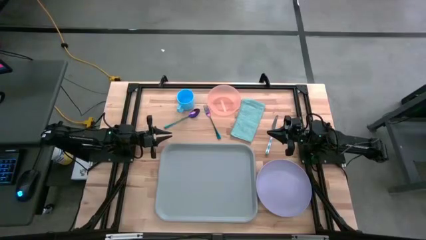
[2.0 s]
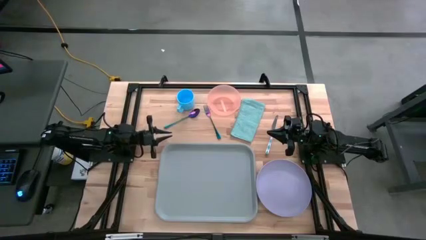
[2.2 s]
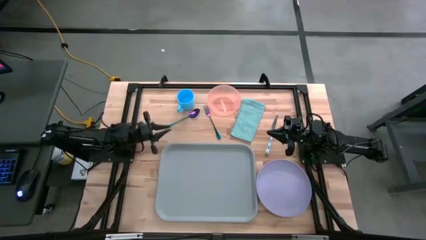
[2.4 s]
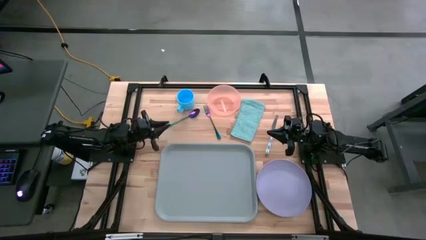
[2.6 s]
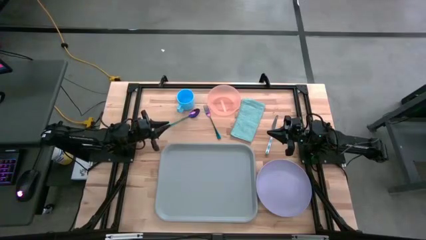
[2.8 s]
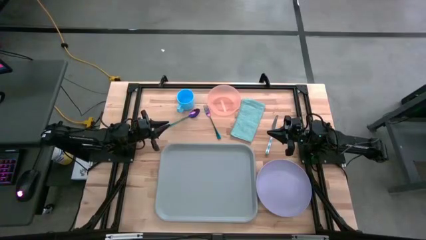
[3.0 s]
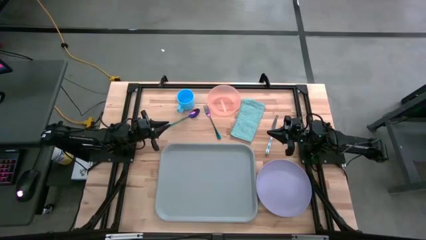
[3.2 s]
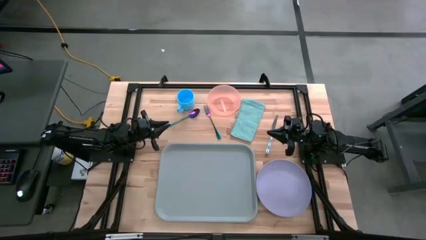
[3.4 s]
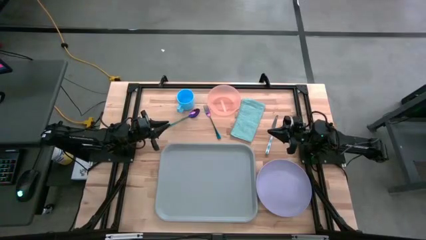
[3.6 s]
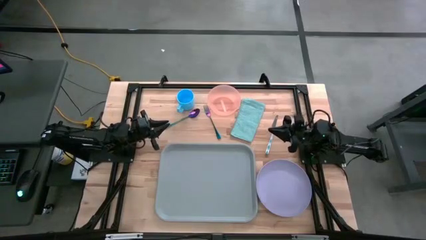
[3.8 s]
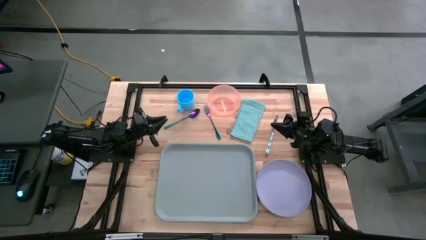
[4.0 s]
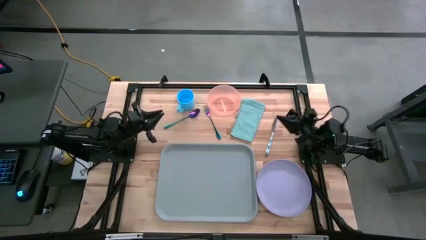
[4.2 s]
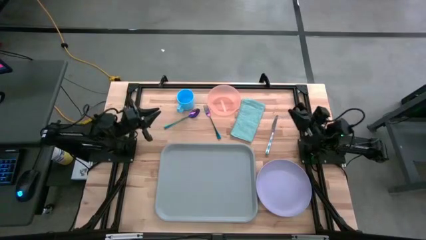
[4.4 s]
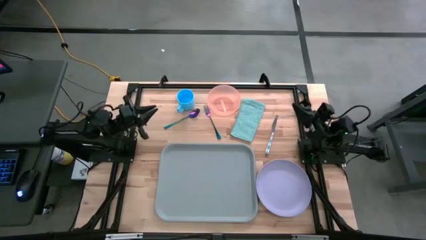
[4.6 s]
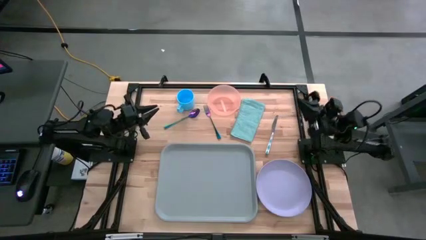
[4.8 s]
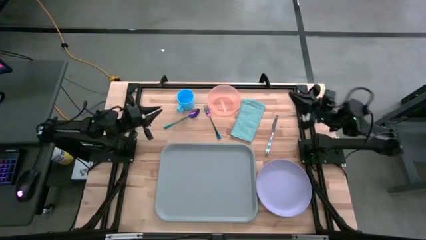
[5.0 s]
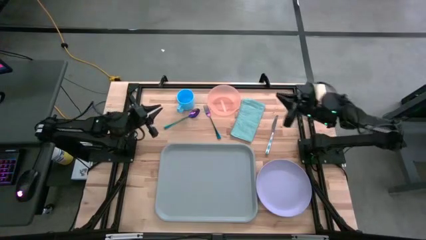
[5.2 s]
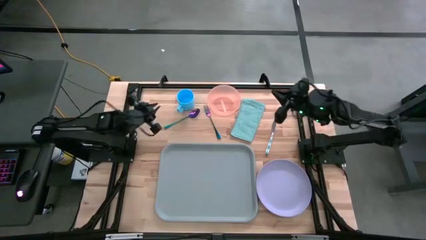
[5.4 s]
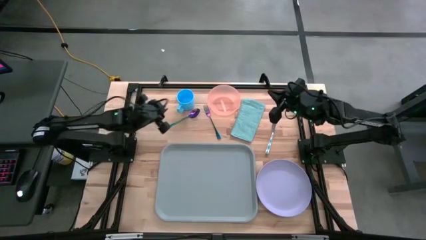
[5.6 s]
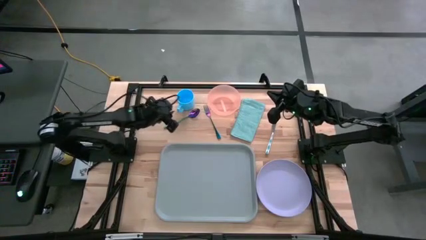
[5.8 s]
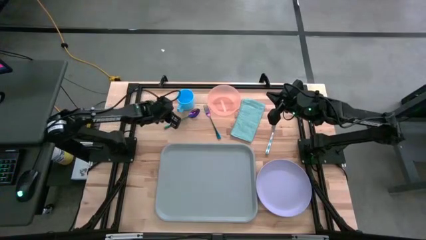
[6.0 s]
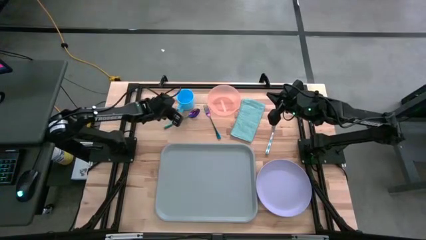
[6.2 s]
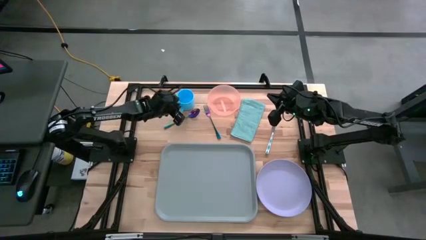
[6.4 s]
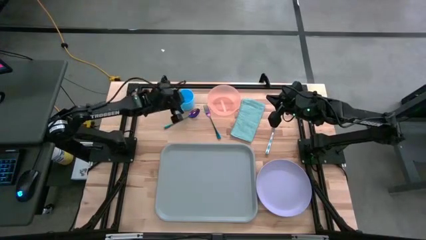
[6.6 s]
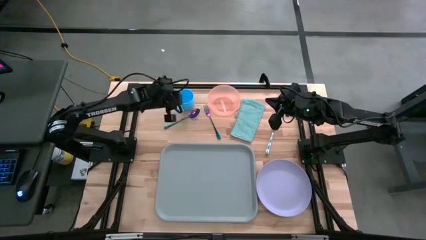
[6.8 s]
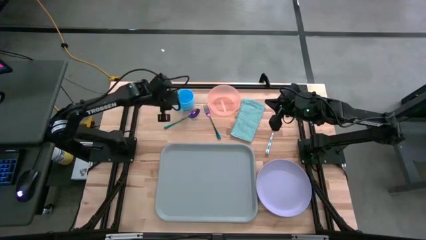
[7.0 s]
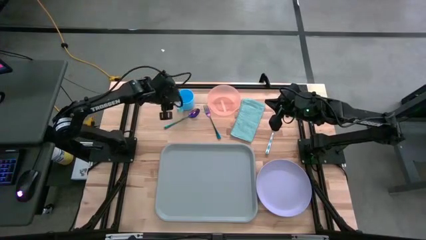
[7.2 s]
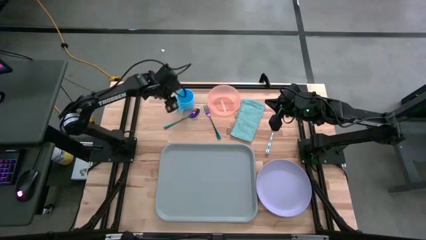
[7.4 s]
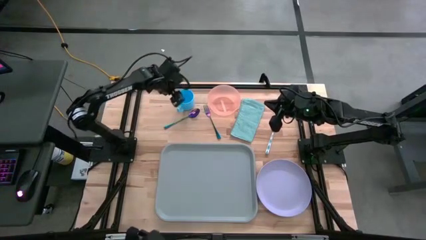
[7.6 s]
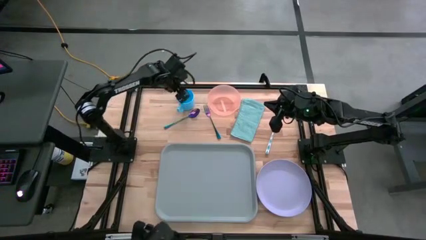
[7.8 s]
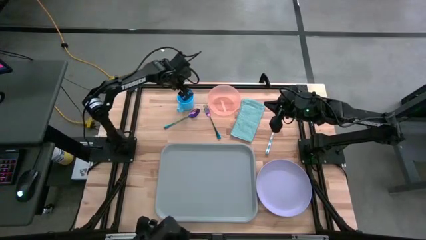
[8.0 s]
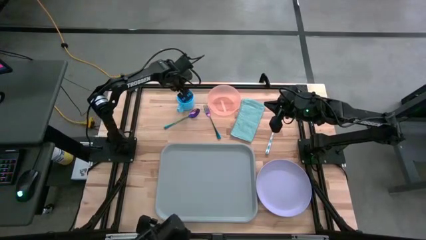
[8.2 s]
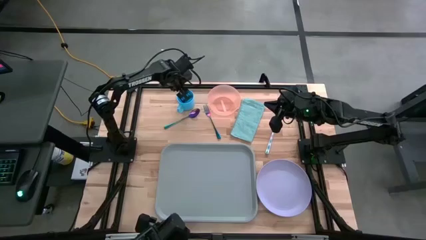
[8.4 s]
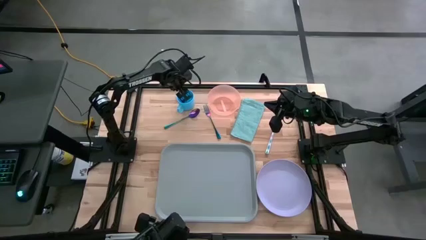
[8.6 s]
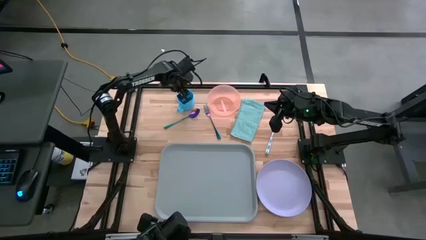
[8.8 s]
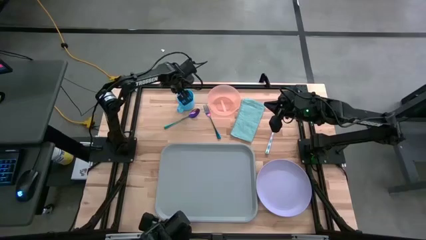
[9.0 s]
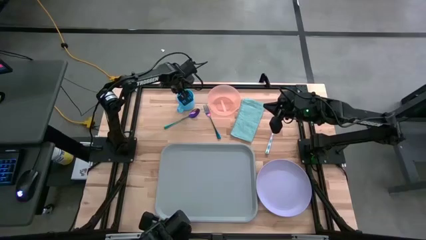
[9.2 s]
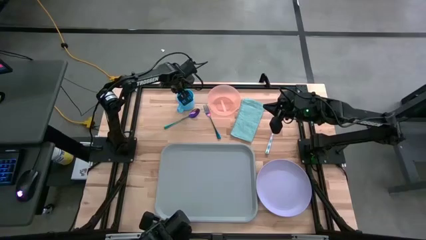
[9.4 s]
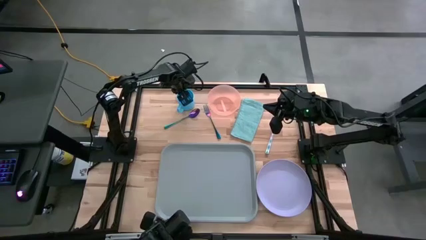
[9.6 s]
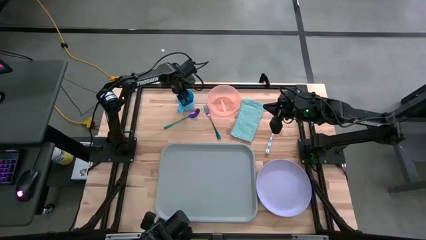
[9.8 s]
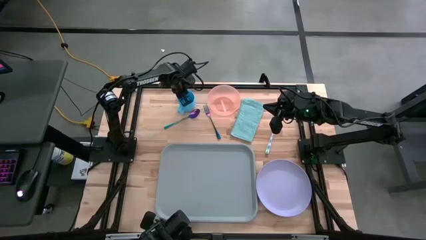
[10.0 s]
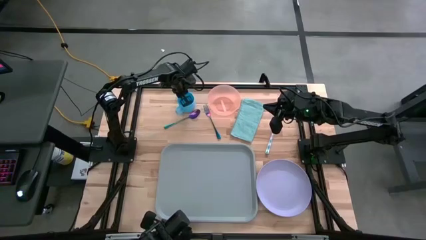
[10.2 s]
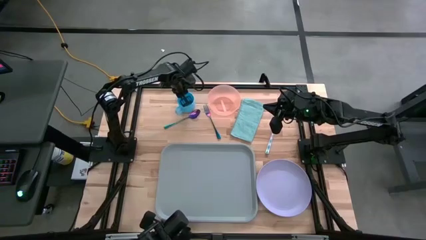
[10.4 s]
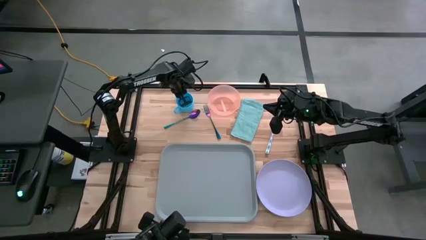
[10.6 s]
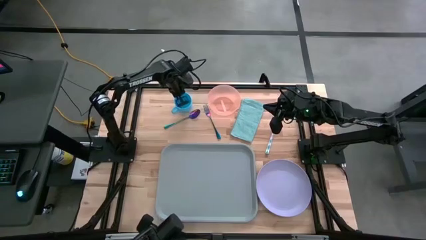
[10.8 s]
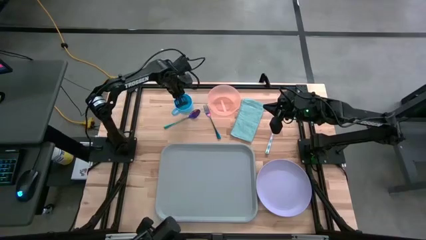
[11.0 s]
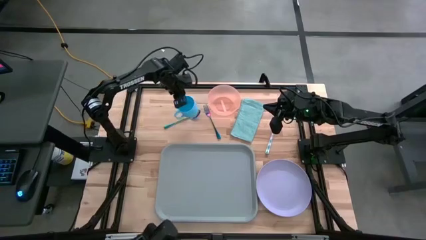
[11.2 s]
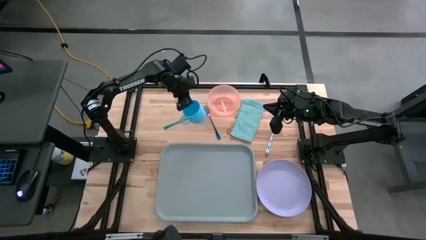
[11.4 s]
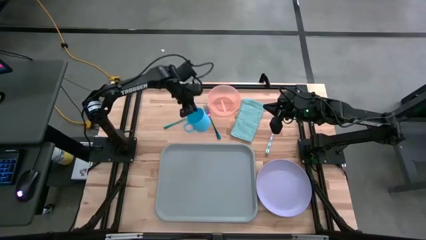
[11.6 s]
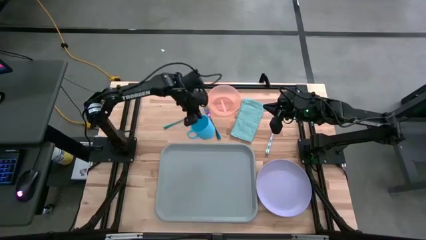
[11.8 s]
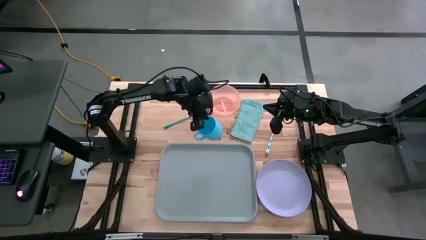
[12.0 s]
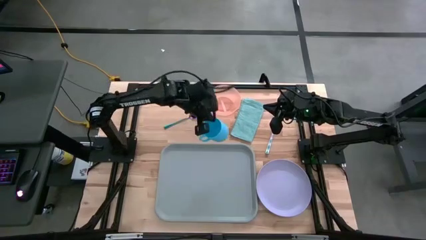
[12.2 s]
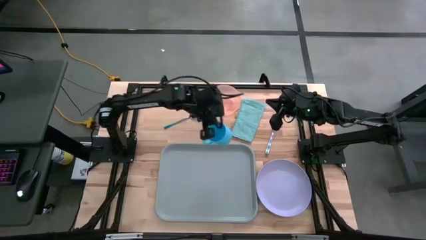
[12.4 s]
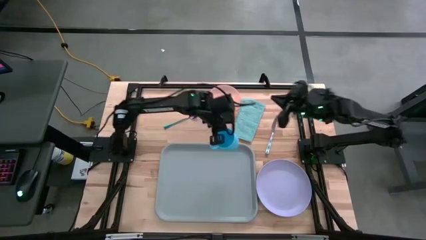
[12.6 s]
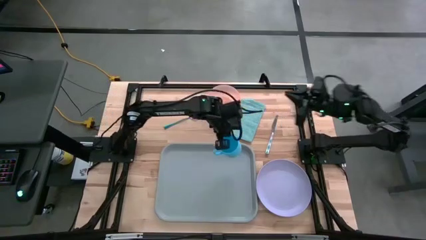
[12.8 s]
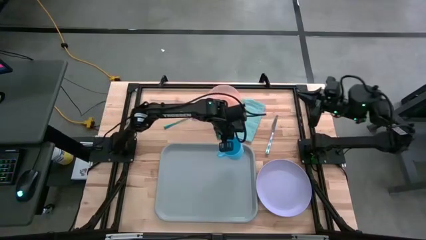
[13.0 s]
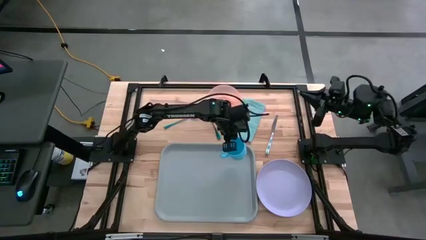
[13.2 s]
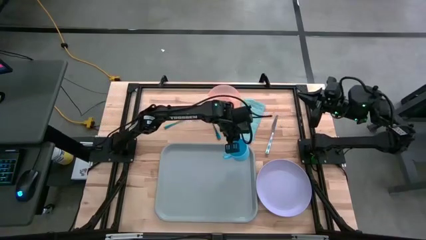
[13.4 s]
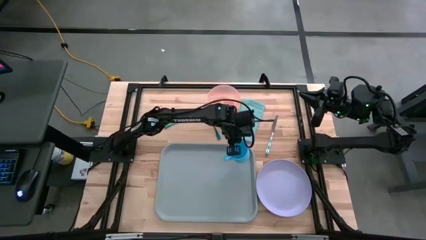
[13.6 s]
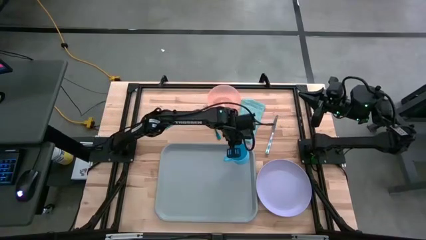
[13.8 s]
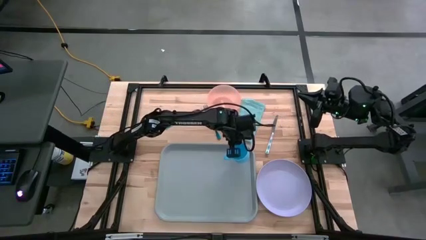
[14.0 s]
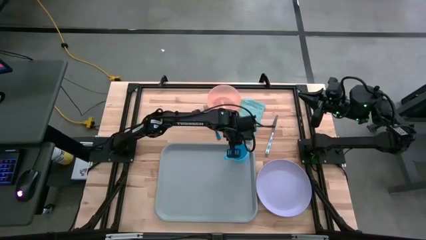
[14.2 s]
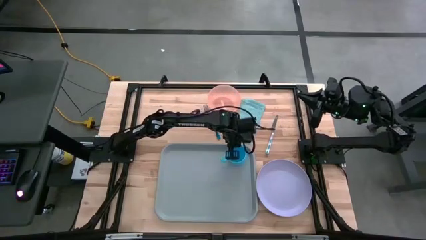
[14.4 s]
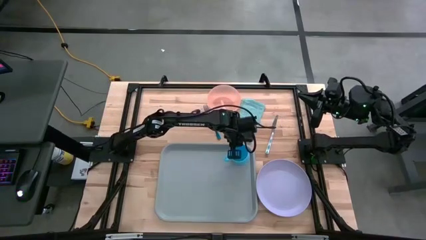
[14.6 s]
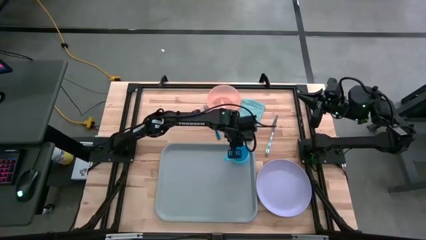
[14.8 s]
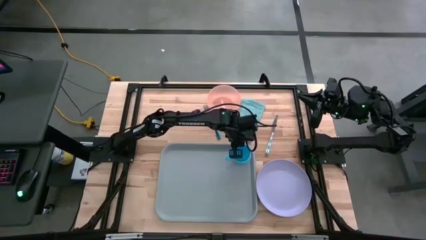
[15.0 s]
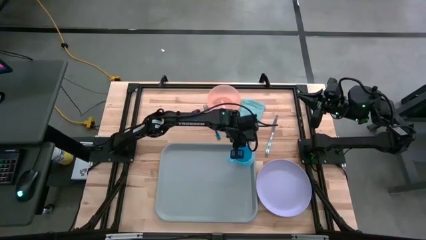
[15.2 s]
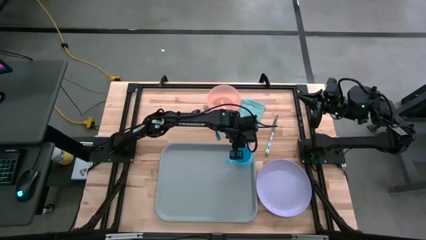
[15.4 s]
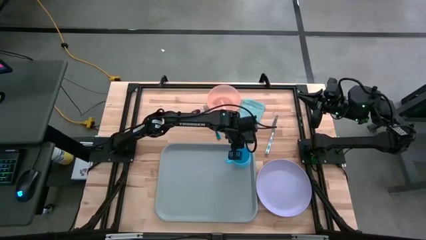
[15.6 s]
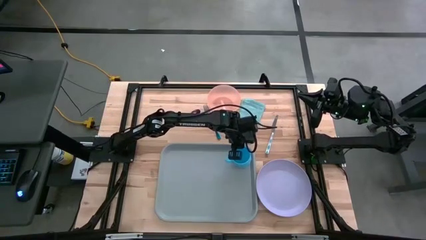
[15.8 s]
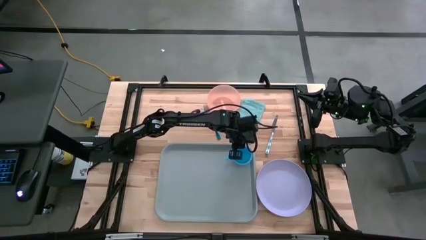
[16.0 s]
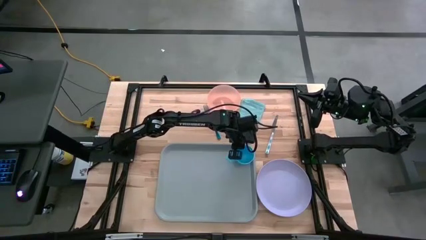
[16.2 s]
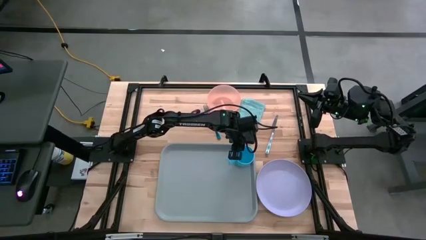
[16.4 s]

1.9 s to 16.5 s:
Task: Set up tray
Put the blue mug on the serving tray
